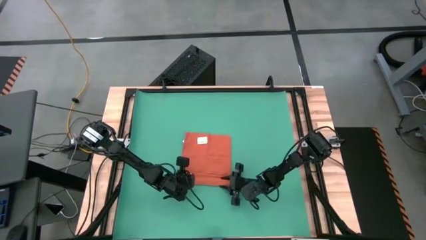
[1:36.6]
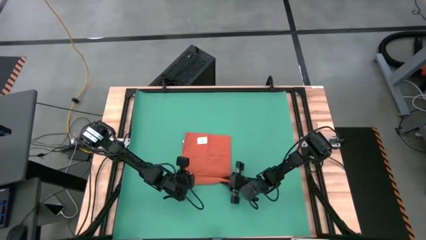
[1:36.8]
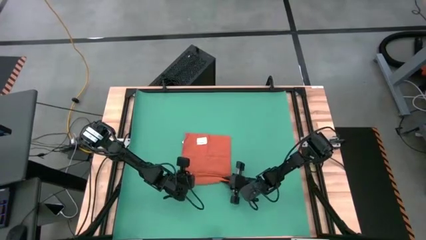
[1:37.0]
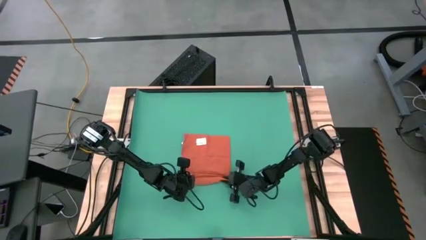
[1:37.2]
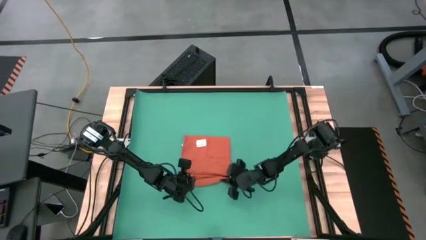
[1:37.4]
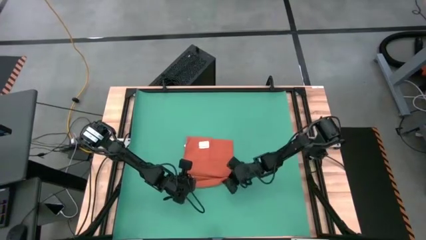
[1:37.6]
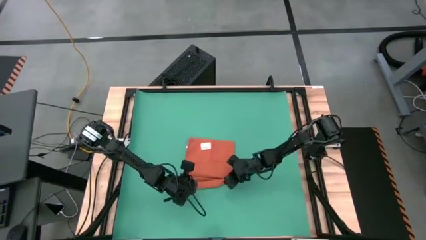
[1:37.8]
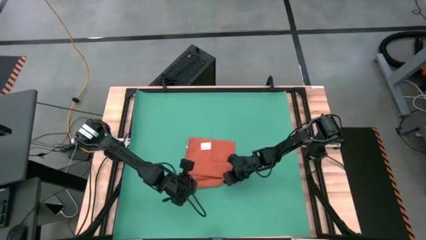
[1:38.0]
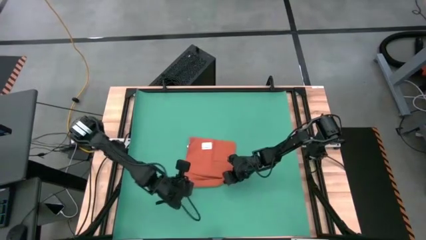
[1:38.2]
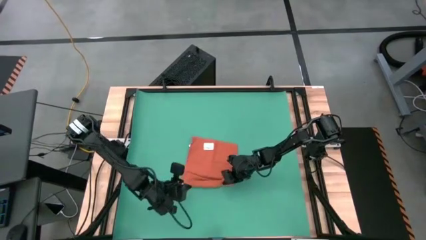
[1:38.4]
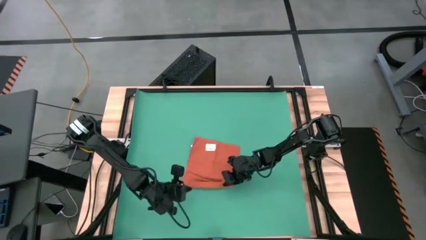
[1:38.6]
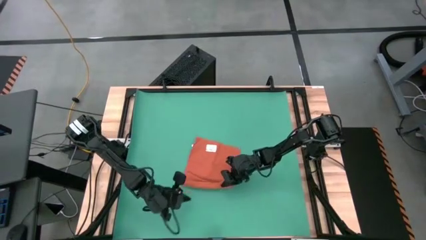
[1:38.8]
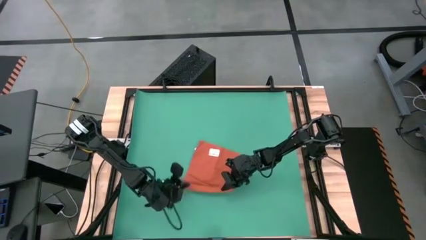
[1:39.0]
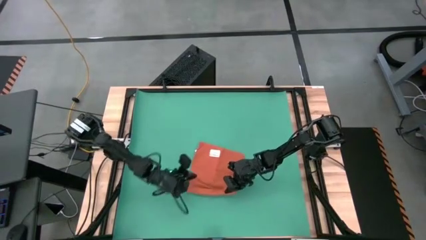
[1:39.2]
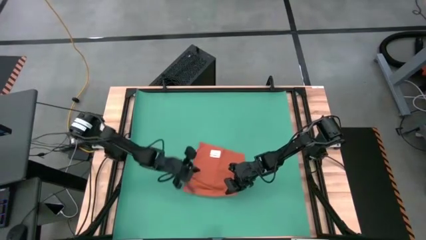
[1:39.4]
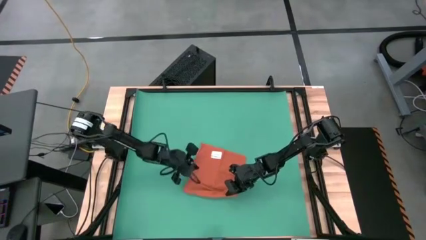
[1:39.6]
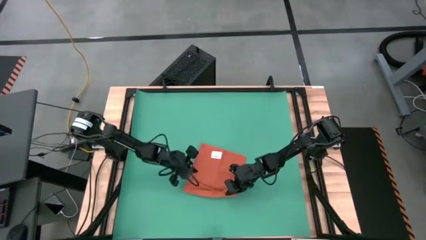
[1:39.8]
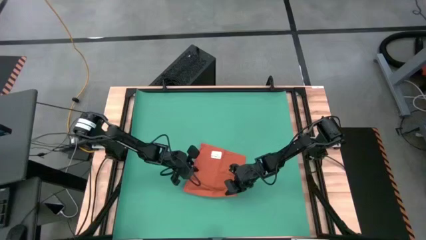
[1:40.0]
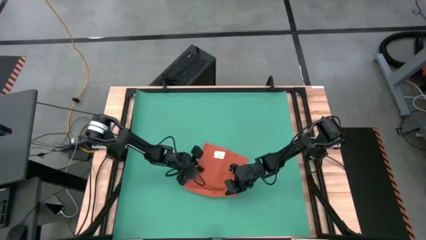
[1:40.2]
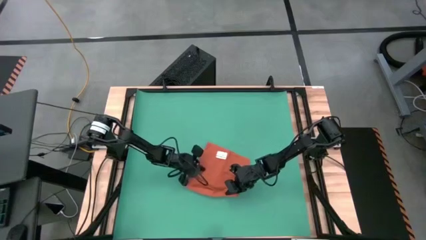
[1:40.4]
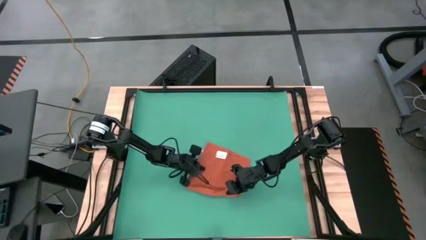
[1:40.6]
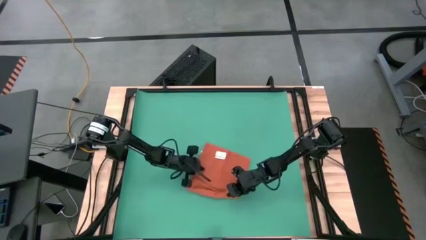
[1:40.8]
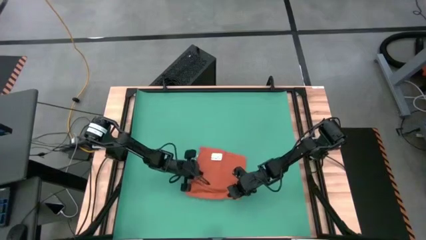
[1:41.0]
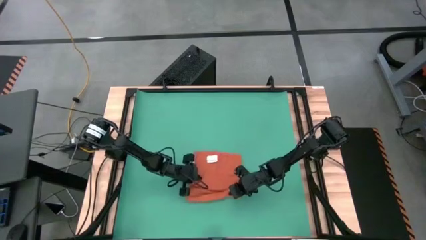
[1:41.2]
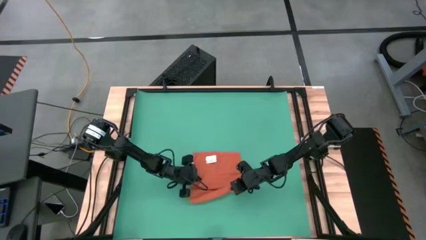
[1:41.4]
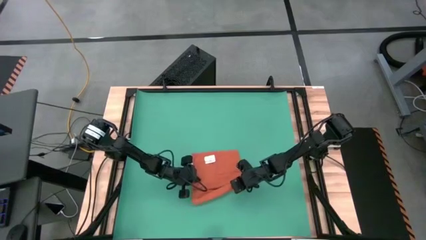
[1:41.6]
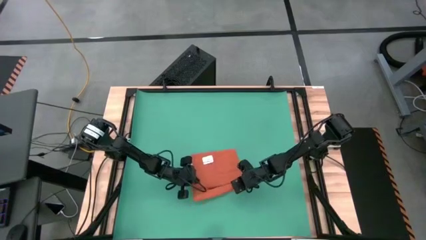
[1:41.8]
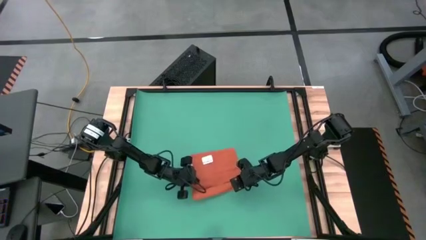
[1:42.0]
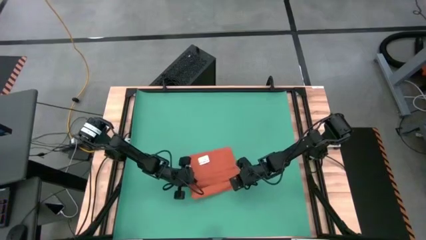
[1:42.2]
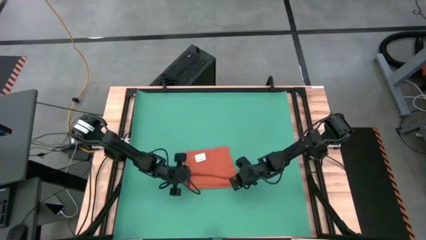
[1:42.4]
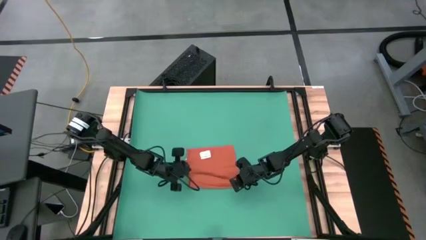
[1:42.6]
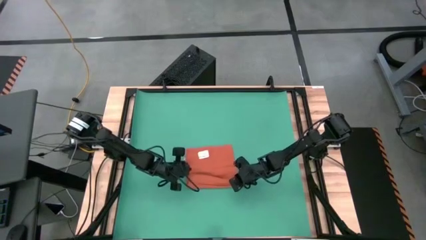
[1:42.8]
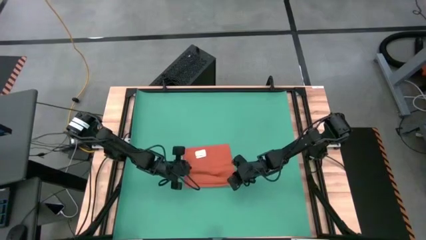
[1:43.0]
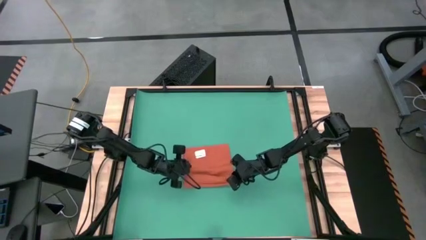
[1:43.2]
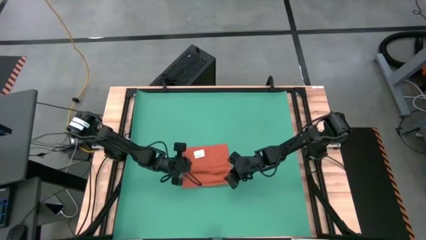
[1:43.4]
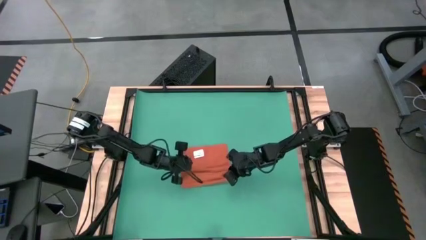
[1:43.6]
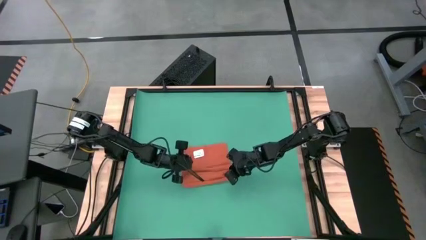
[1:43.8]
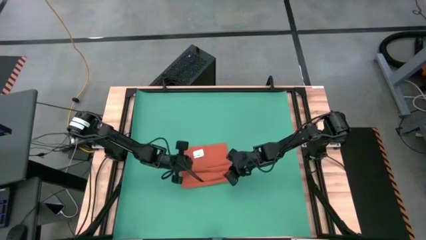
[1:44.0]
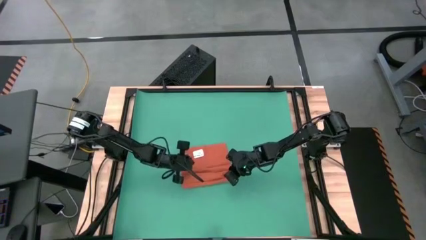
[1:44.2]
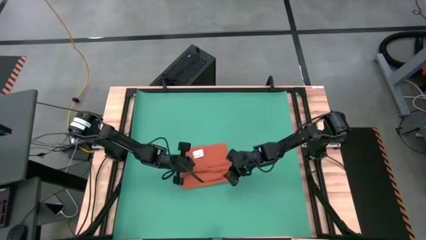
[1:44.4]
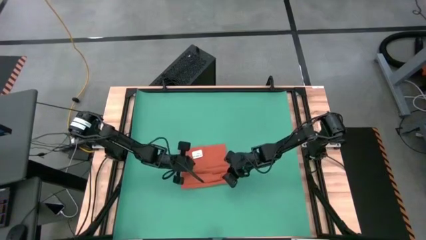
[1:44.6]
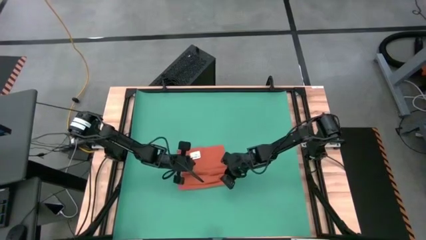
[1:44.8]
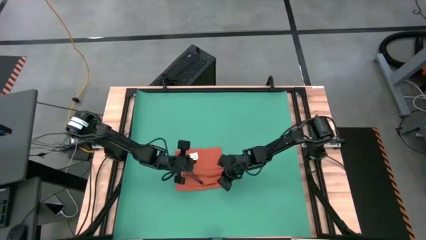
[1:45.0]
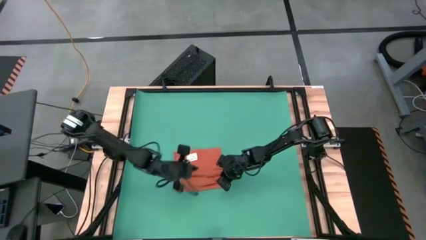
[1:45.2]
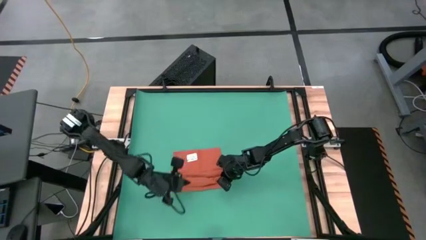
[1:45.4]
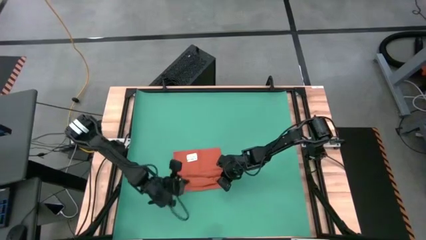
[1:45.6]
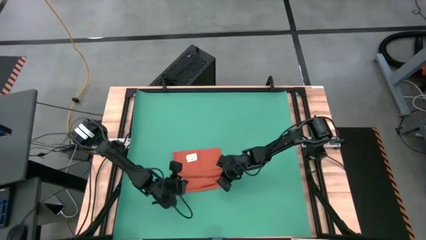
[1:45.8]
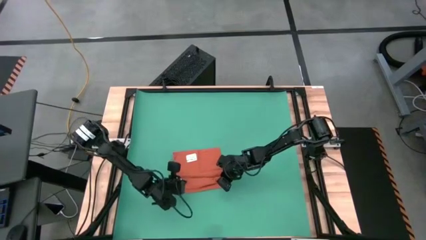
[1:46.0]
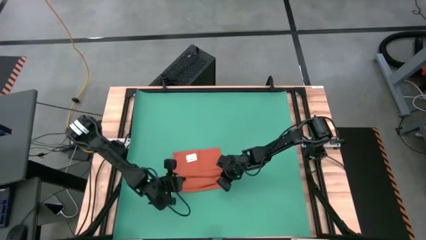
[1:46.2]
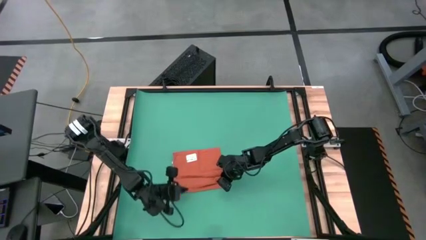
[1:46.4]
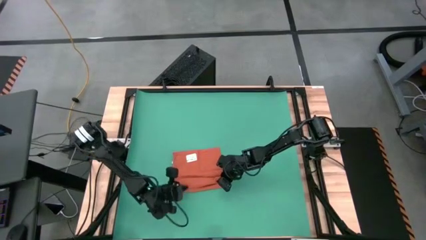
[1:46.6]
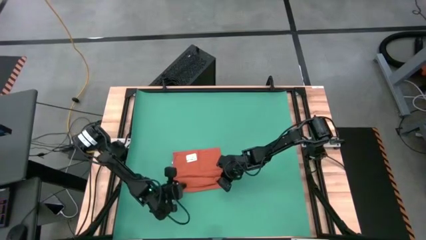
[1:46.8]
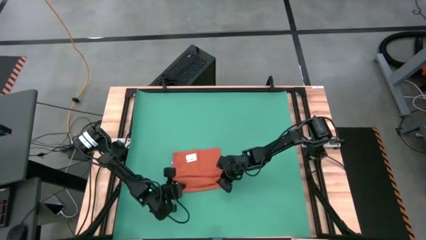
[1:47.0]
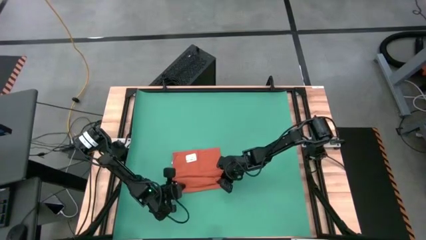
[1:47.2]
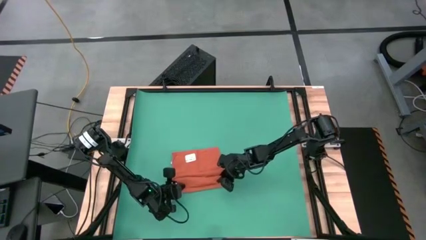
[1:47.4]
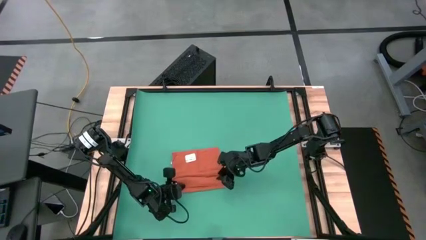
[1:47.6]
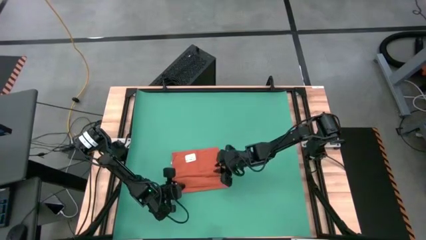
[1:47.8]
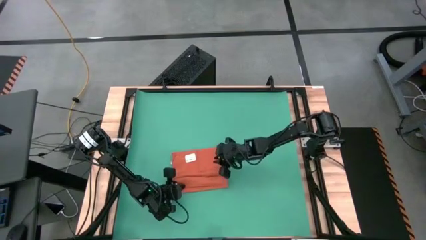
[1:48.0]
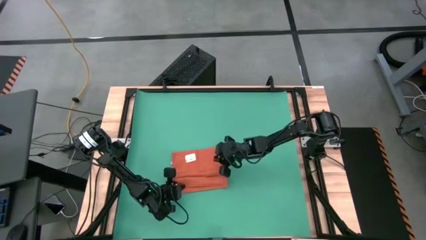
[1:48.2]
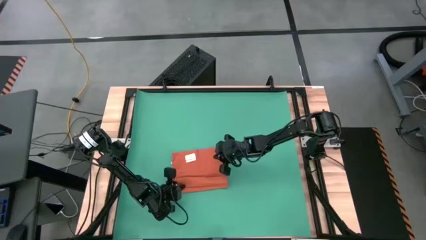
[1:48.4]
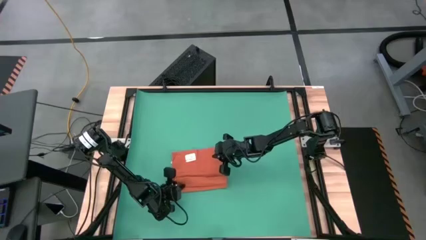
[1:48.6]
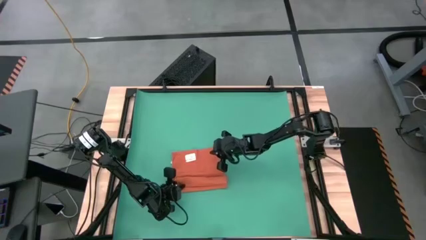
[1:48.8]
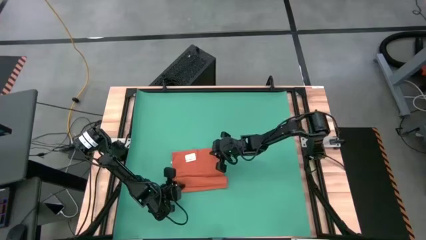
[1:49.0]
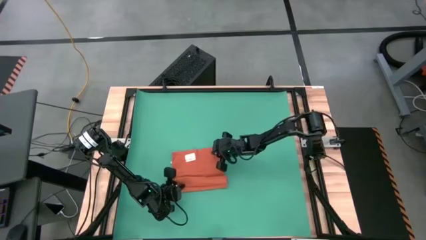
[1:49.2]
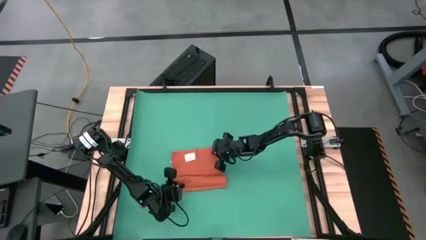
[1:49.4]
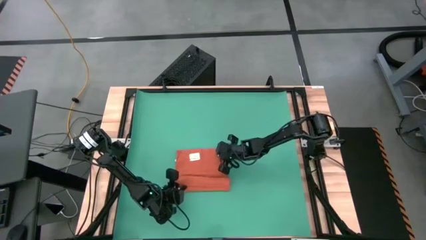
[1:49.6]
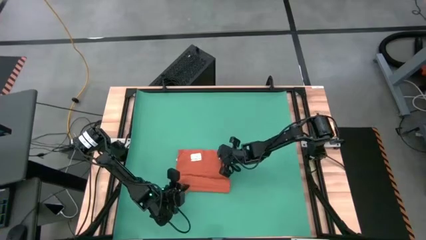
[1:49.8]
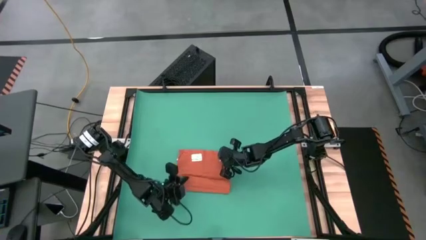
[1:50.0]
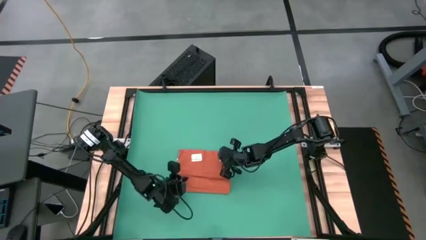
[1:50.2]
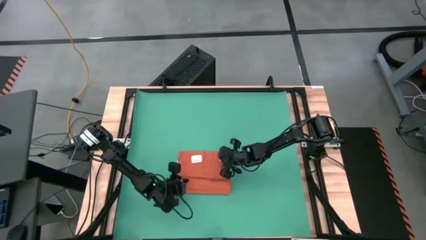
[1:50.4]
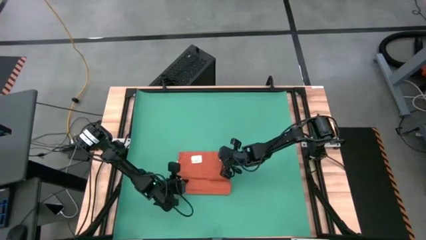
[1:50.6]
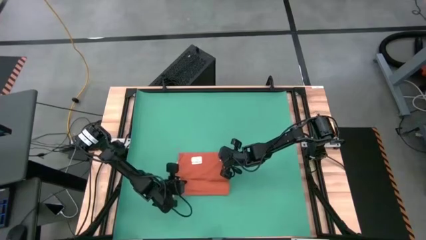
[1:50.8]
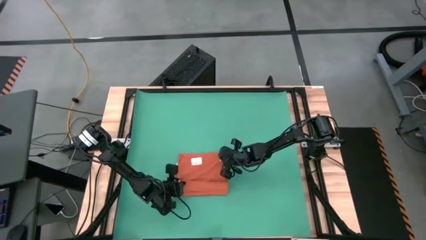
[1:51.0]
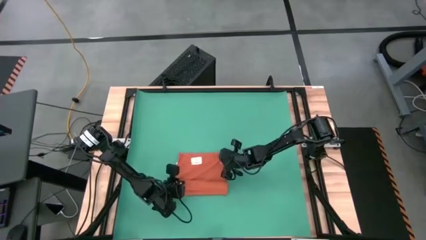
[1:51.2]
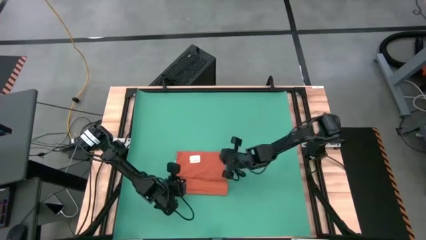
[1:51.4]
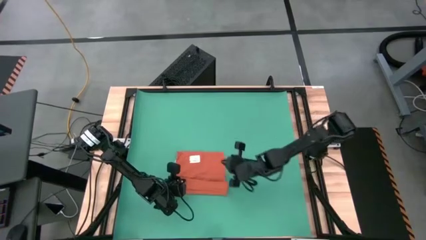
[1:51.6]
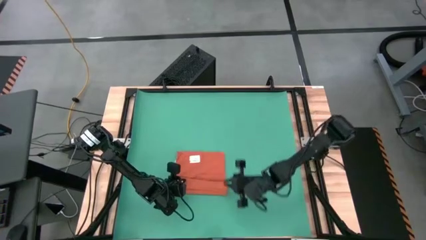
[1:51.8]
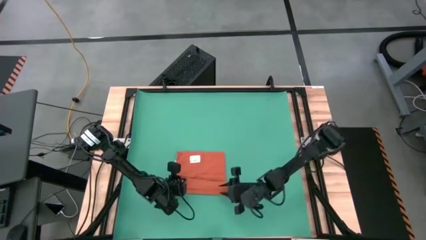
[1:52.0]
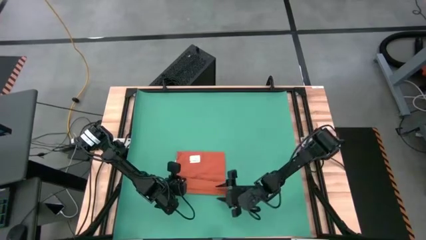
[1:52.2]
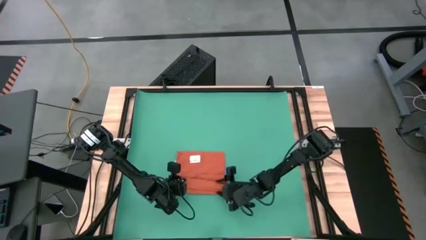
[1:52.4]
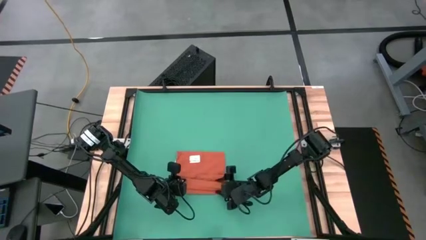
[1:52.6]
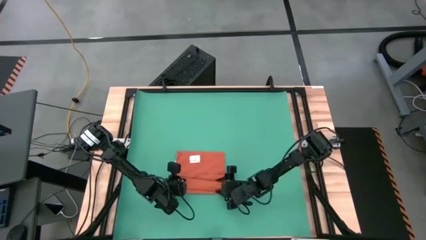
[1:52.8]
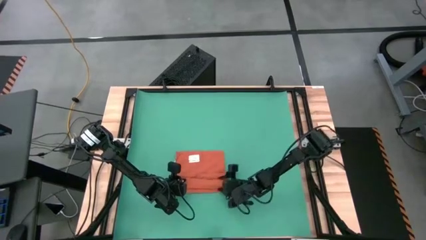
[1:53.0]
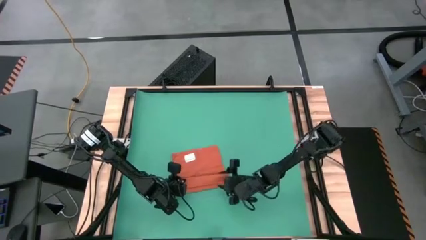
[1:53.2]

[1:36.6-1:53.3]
Task: Roll towel into tight, uniform cylinder
Roll the orange table napkin
